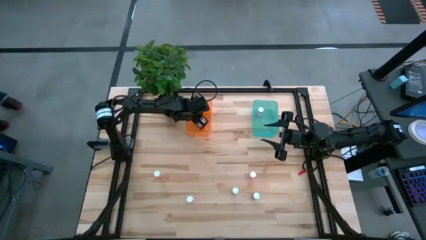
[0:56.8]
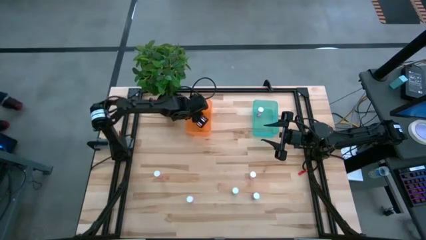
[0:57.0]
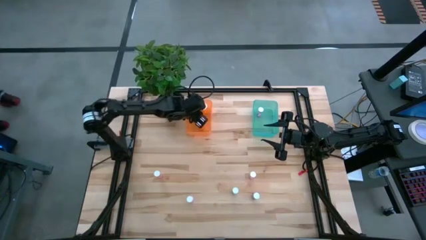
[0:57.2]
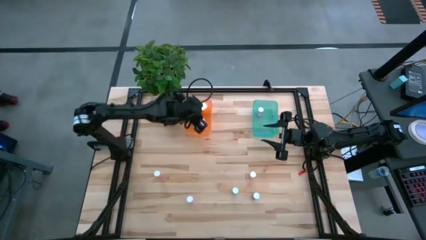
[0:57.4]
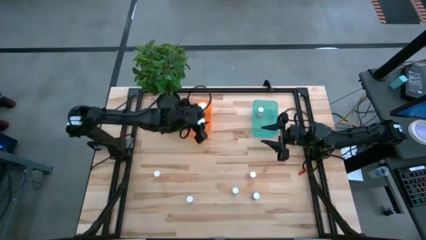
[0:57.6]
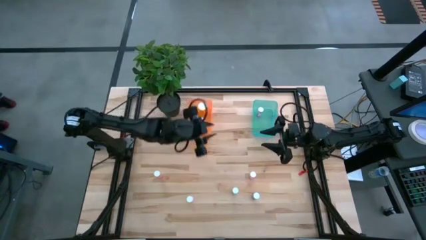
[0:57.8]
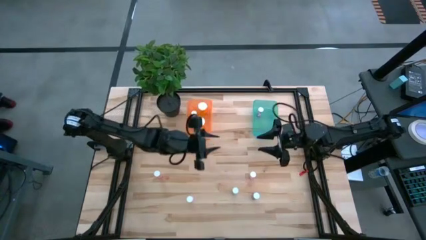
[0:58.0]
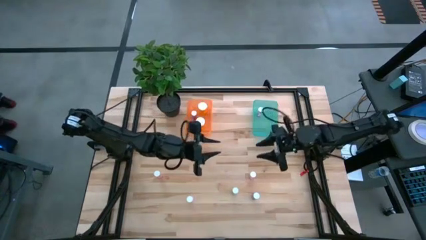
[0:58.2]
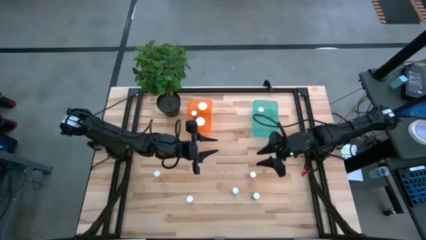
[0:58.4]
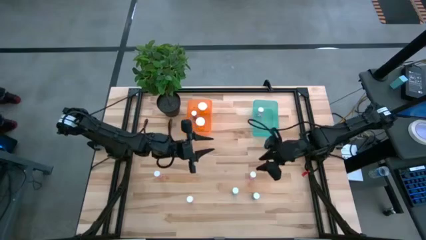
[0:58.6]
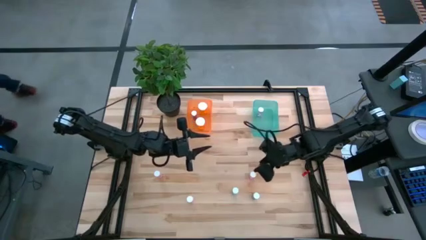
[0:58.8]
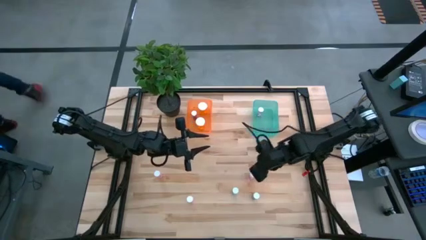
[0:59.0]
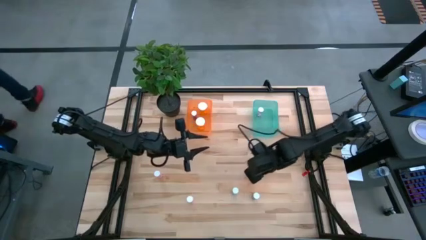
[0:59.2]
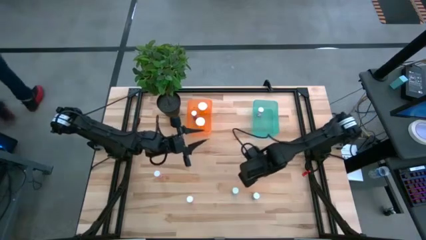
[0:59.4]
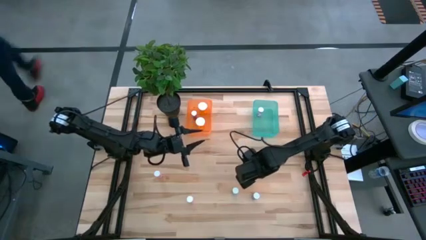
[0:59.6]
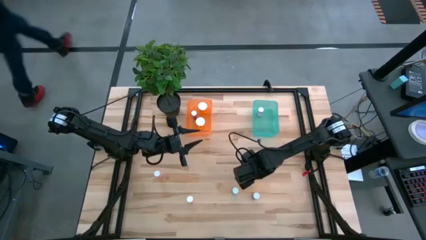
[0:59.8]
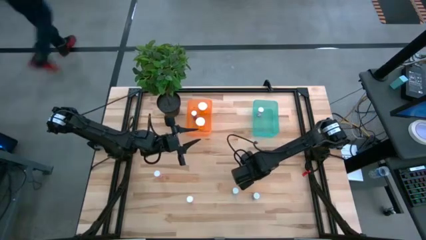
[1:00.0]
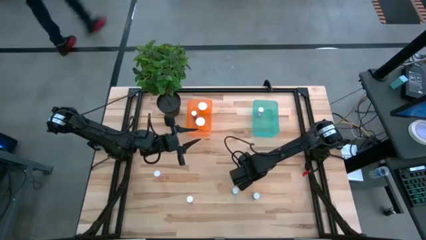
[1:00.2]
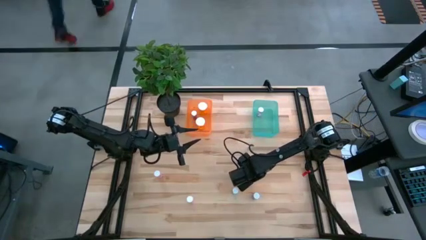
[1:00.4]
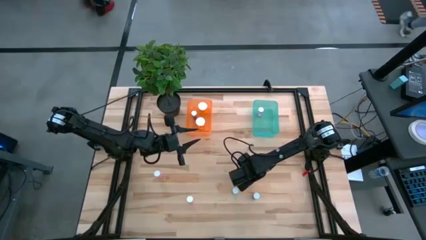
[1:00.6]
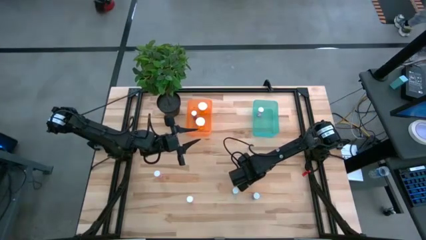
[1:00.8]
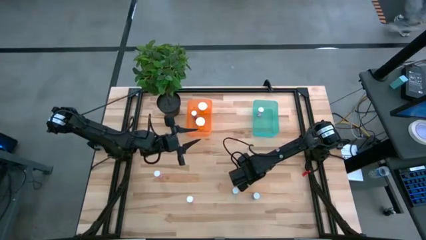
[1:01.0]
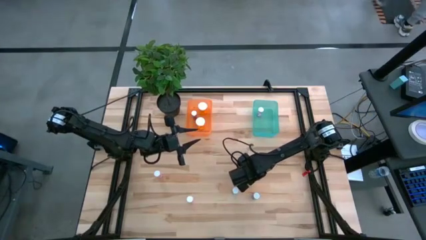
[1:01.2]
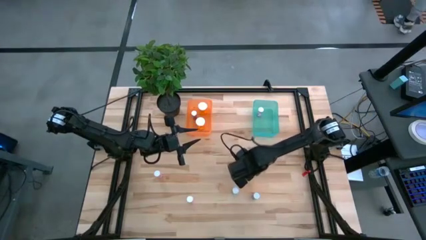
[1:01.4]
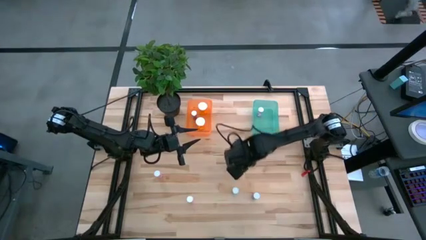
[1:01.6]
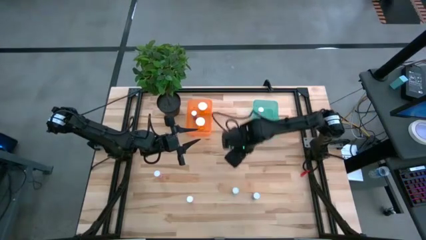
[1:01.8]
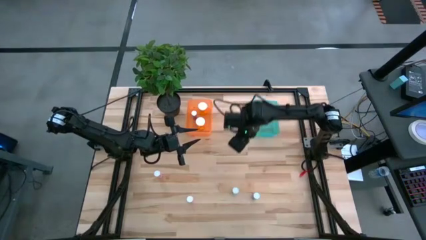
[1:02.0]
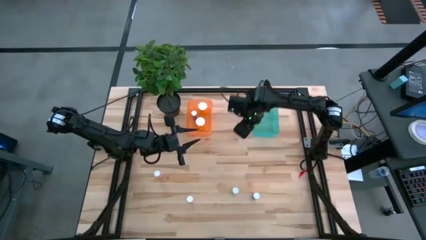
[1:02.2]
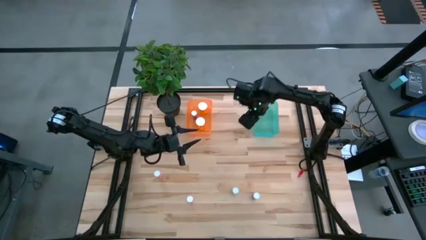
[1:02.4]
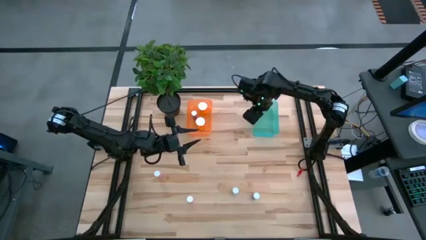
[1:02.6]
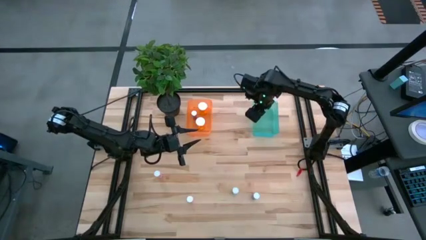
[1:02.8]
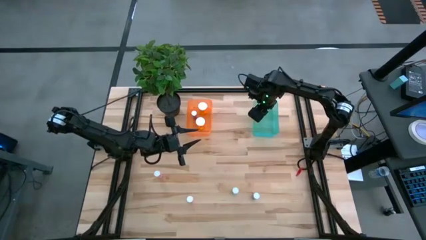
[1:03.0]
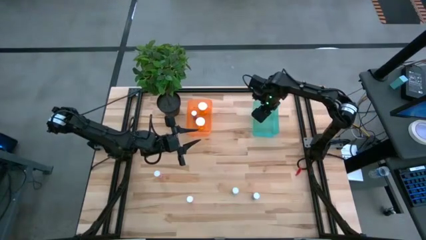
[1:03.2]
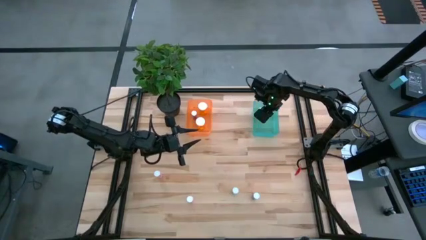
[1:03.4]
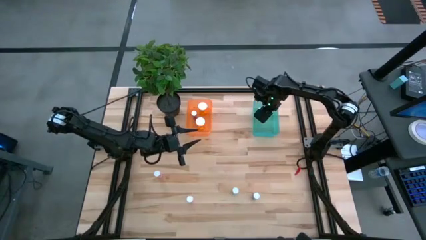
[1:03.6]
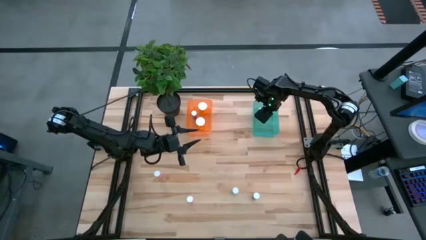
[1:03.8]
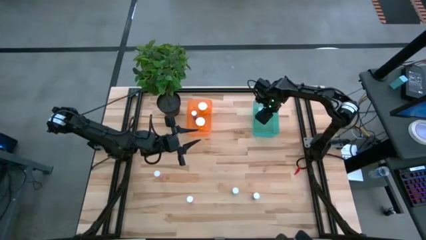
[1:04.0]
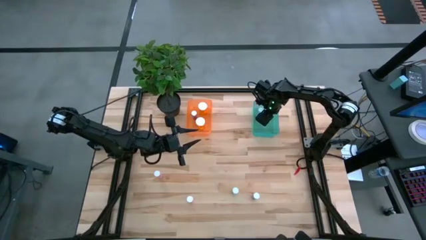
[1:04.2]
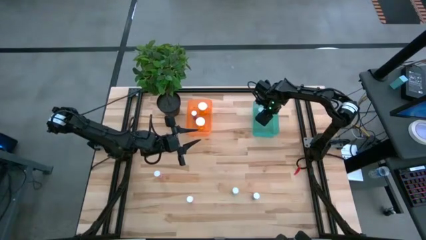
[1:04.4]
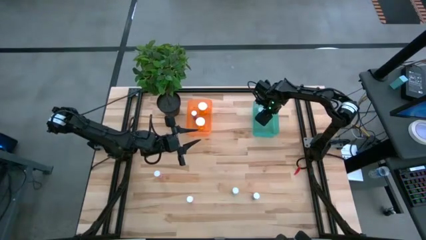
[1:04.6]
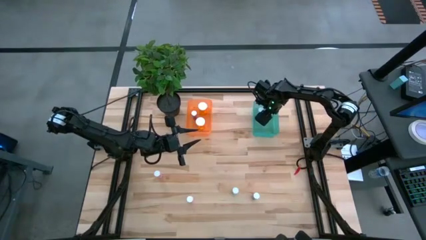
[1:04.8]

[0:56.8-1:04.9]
Task: Pick and place medicine bottles into bin by pill shape (circle, oval)
Put the top right pink tablet bottle into the green bin

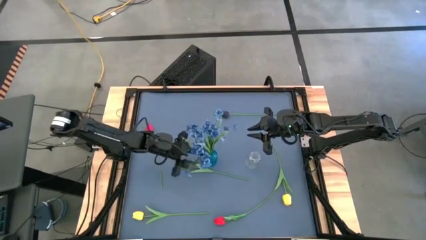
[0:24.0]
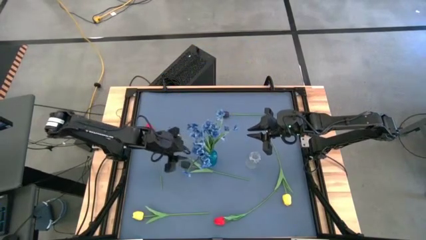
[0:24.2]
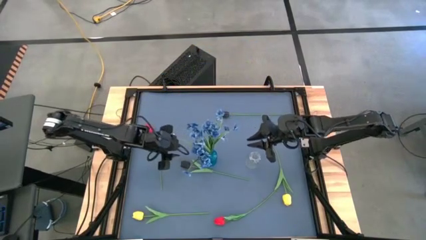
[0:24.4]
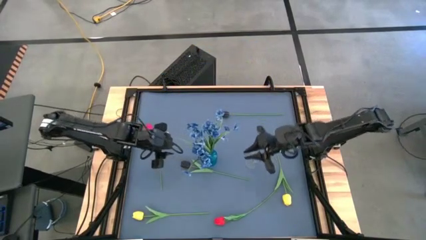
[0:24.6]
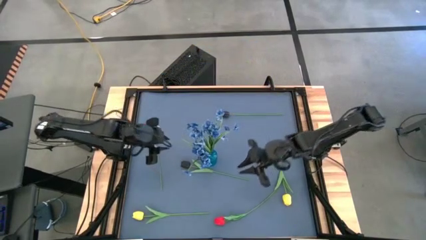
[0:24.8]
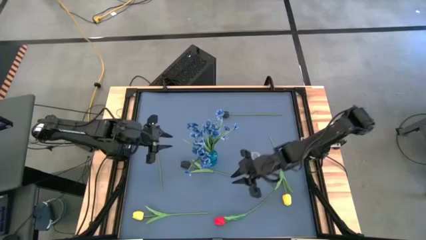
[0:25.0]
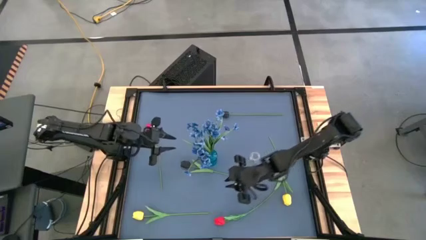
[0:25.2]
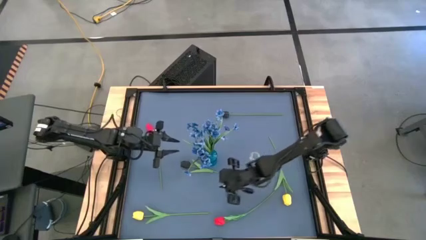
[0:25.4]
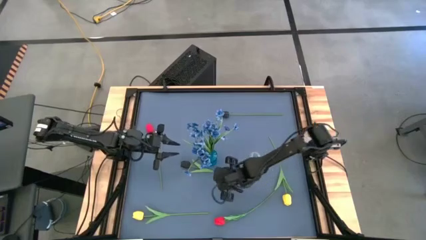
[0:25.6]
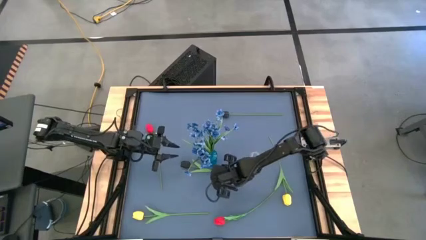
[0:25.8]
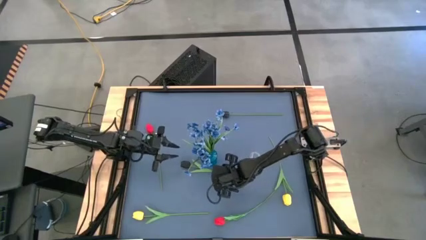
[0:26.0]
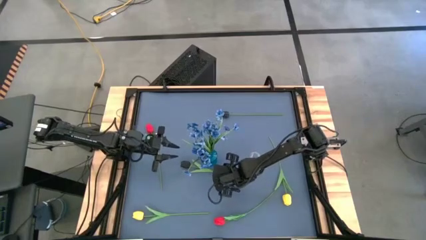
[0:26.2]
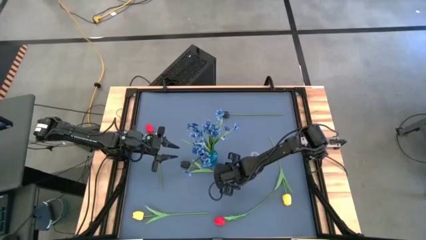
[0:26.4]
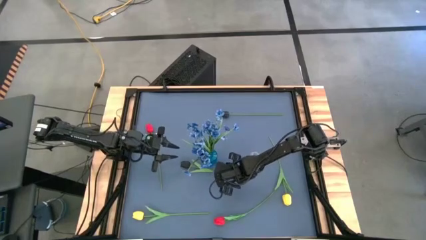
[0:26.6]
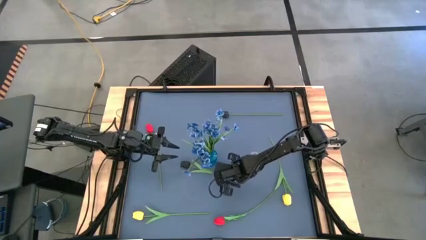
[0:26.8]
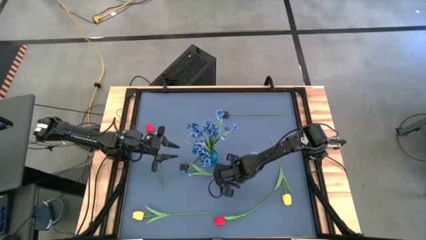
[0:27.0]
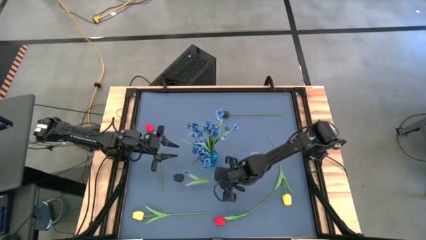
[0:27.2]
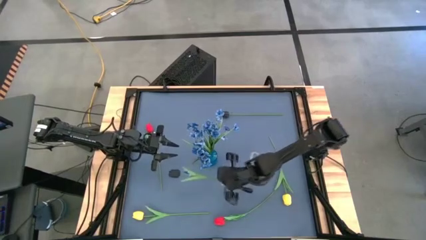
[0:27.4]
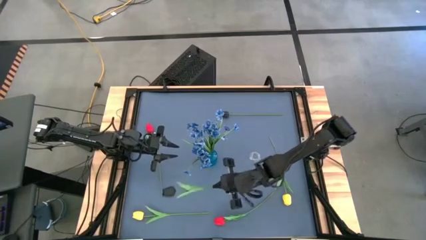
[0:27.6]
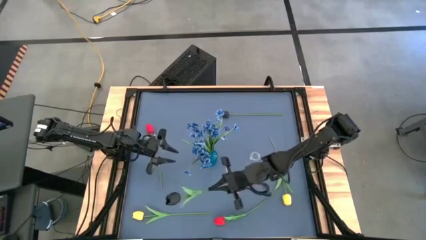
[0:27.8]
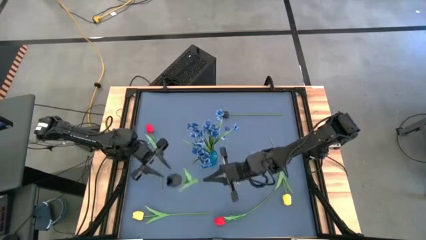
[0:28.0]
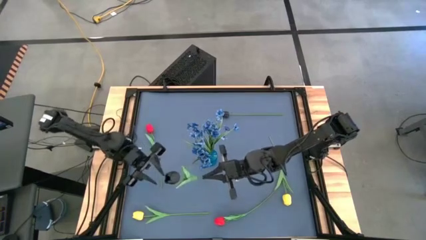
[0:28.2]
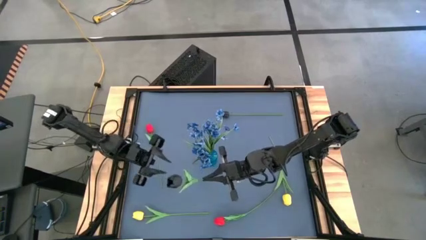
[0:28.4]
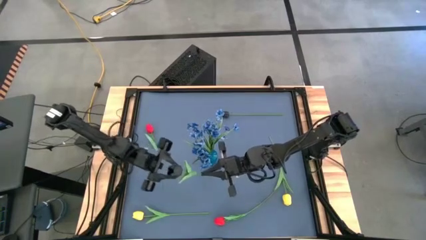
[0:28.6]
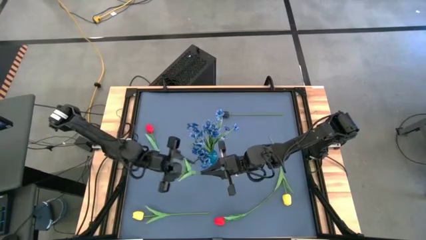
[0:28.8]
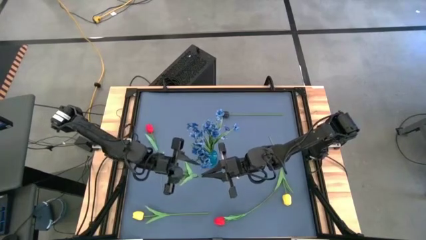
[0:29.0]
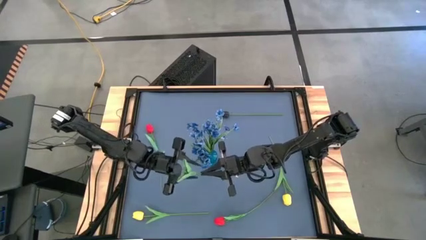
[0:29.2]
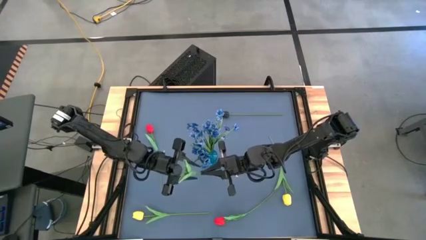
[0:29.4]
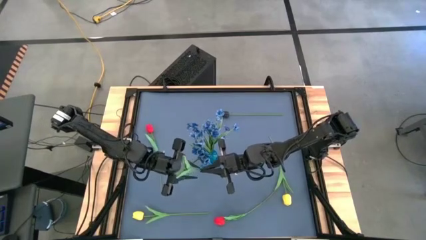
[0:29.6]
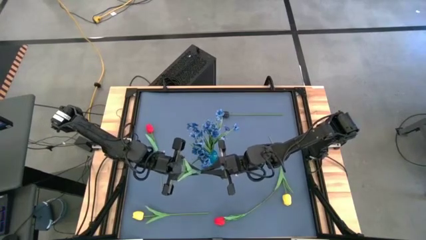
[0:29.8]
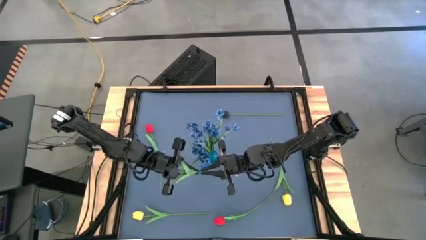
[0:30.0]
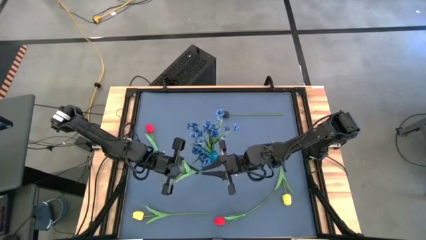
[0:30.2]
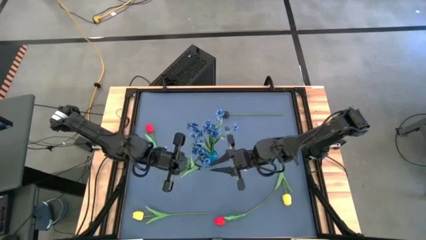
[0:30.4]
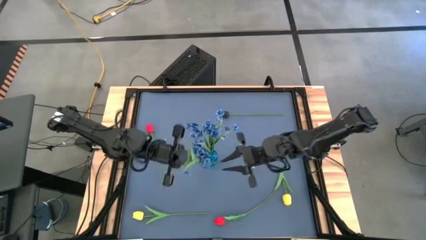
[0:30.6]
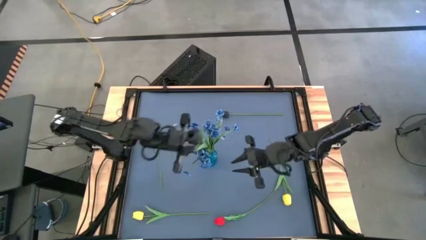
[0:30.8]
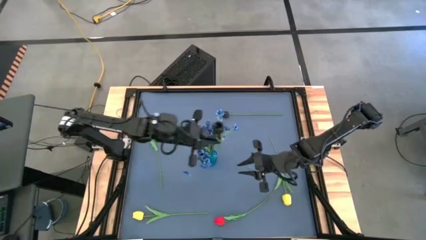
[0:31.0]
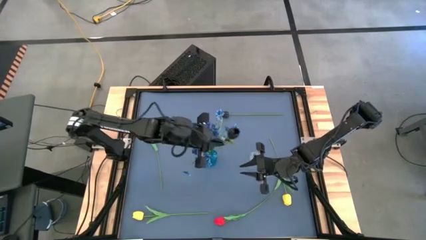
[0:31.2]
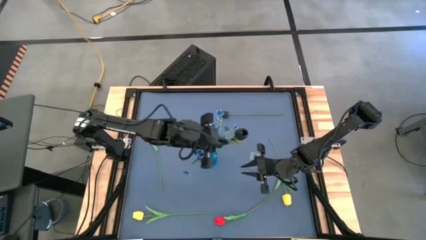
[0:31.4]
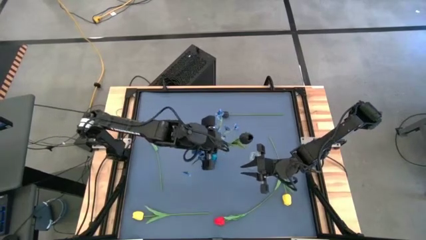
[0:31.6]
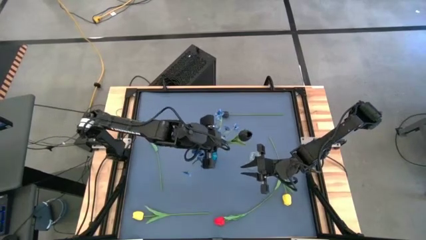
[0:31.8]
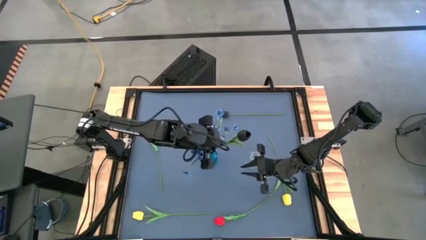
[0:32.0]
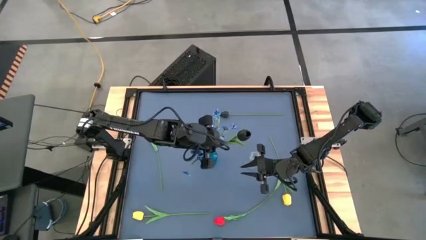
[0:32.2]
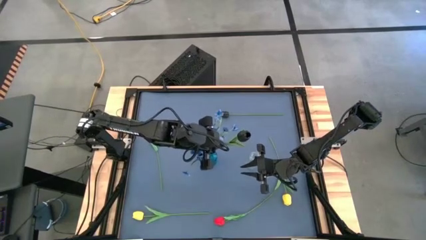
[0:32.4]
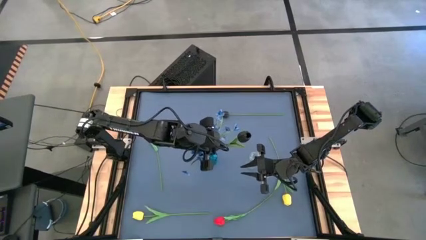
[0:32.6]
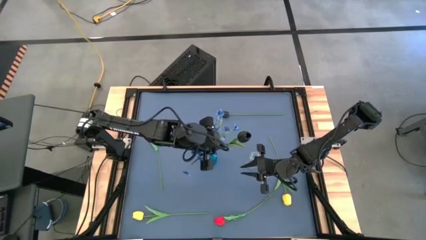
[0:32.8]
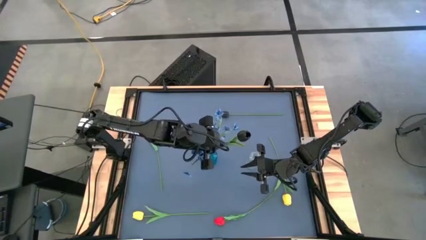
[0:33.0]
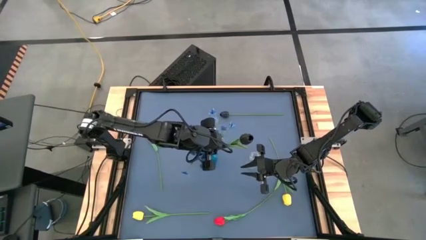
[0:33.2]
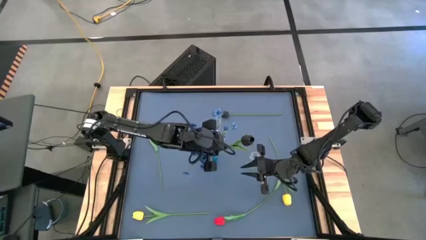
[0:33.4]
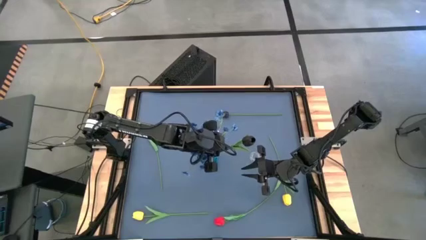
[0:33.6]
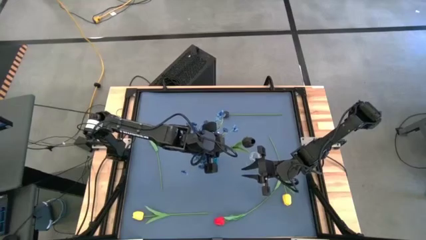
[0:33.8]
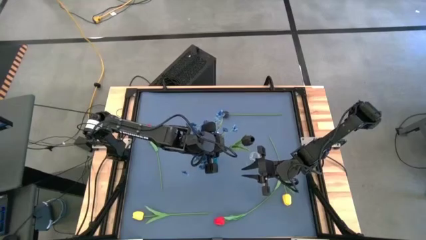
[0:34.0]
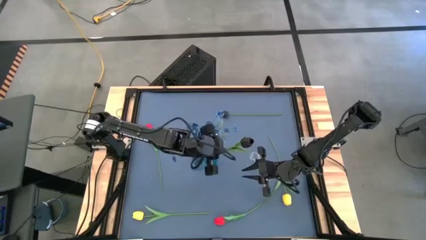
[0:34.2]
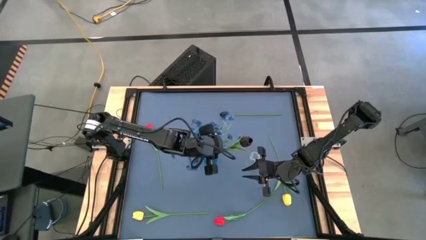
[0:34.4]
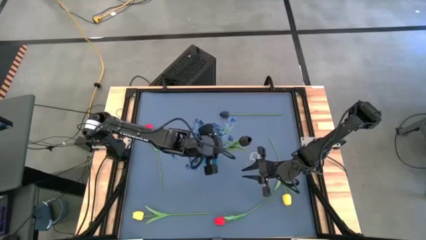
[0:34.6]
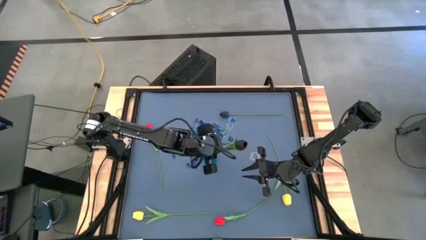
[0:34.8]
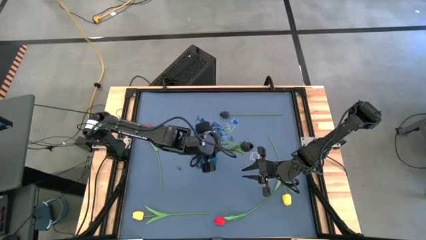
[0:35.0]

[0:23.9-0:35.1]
Task: Sort flowers into vase by color
Put the bottom black flower into the blue flower vase
